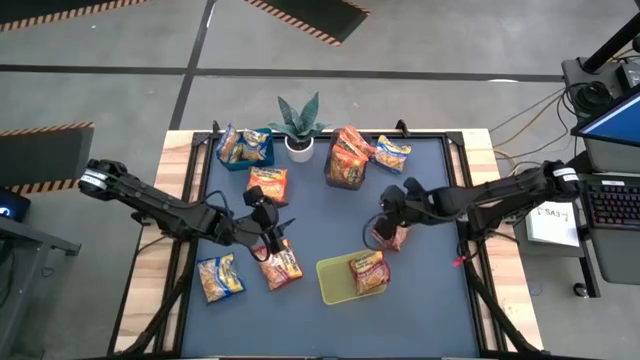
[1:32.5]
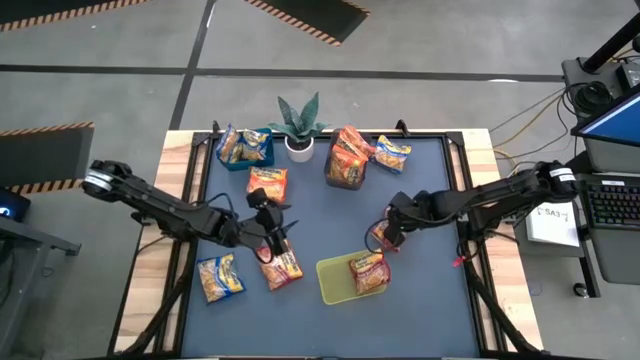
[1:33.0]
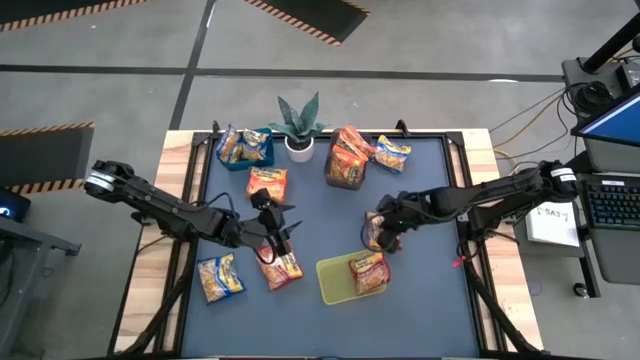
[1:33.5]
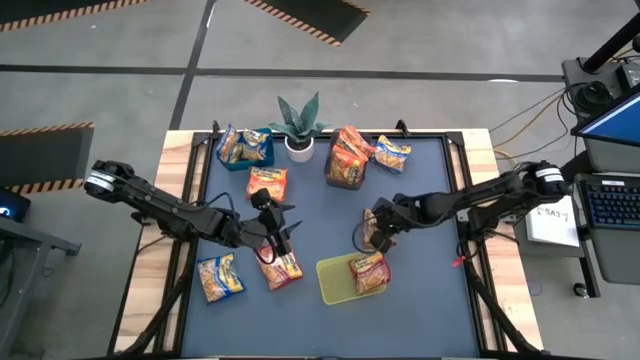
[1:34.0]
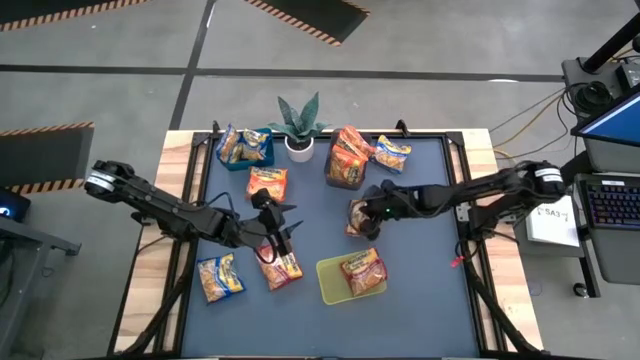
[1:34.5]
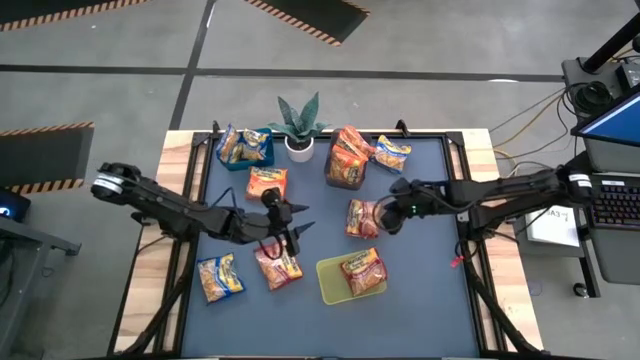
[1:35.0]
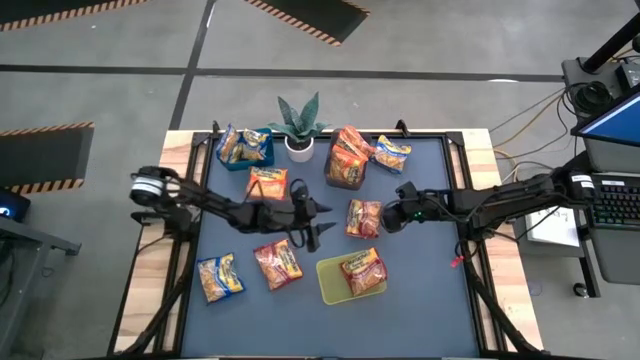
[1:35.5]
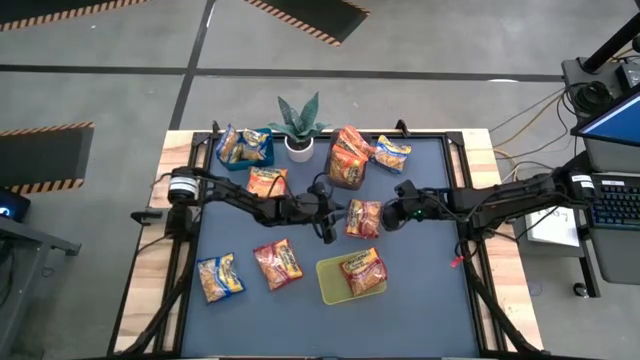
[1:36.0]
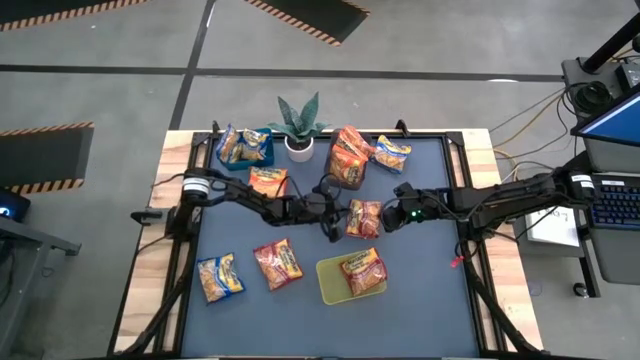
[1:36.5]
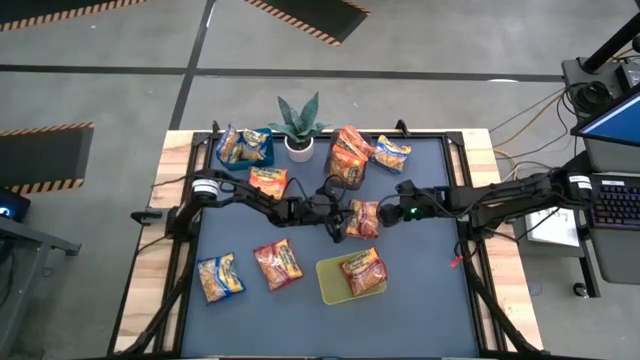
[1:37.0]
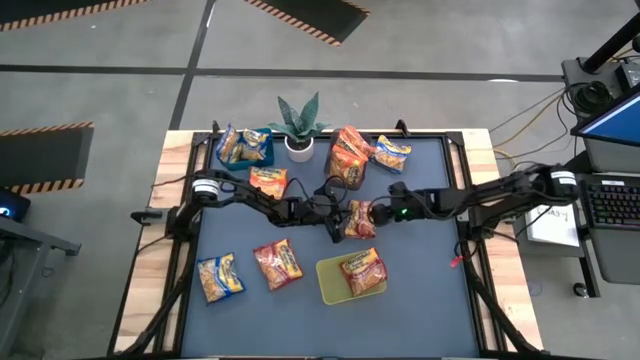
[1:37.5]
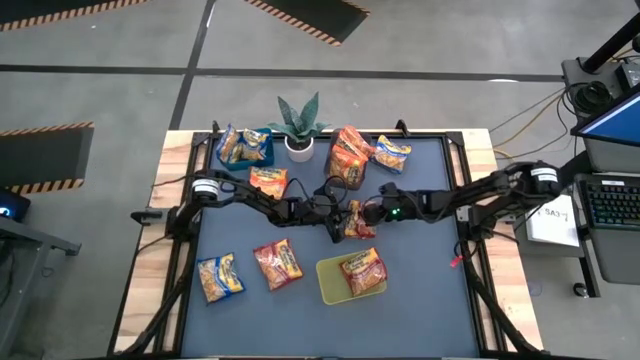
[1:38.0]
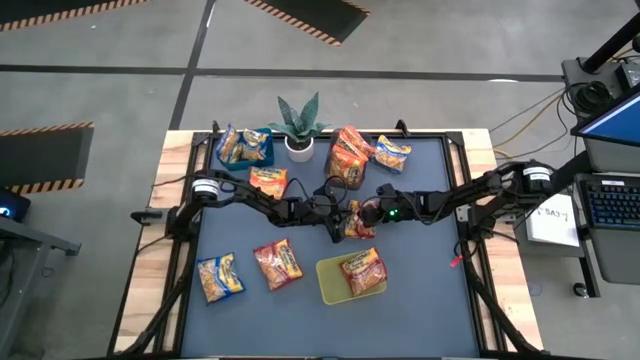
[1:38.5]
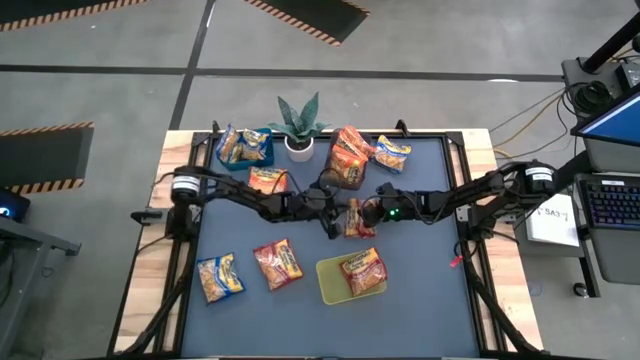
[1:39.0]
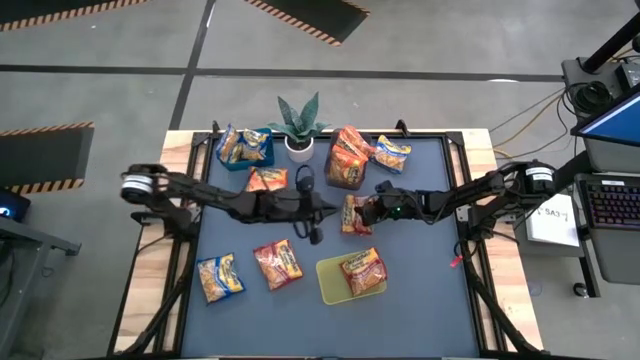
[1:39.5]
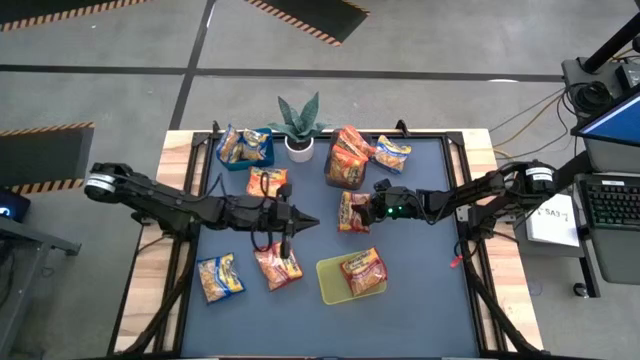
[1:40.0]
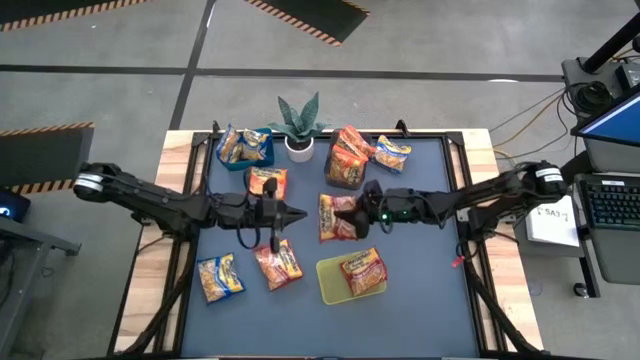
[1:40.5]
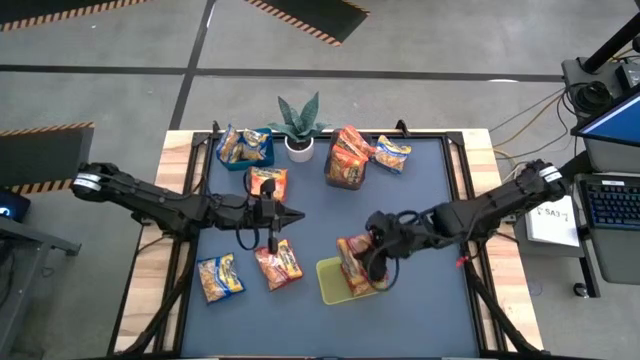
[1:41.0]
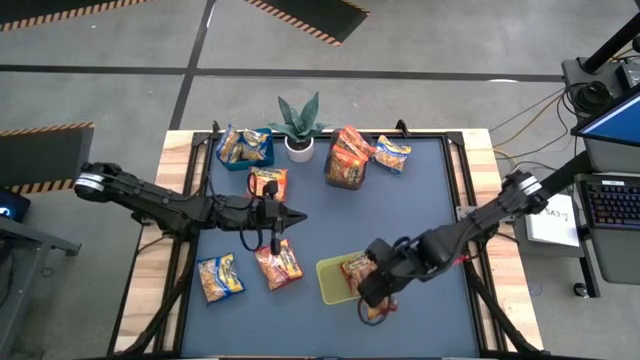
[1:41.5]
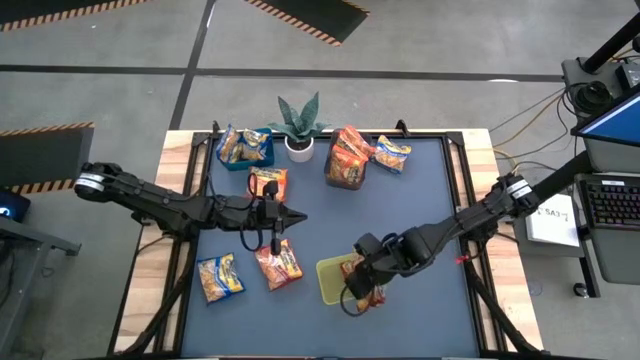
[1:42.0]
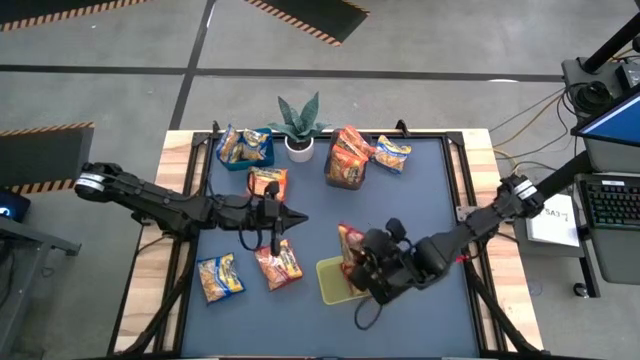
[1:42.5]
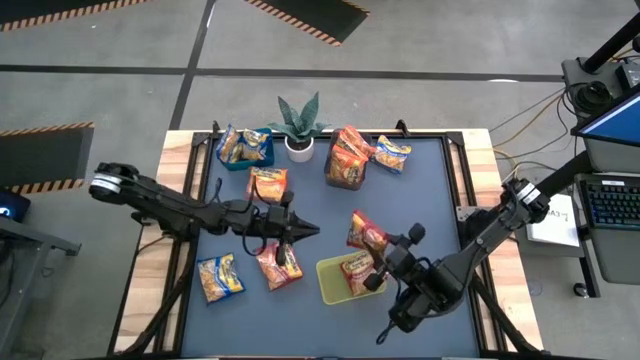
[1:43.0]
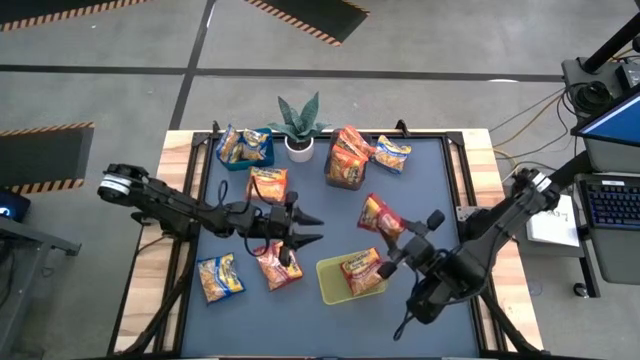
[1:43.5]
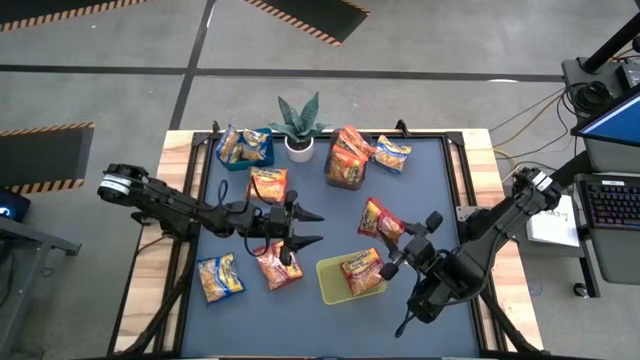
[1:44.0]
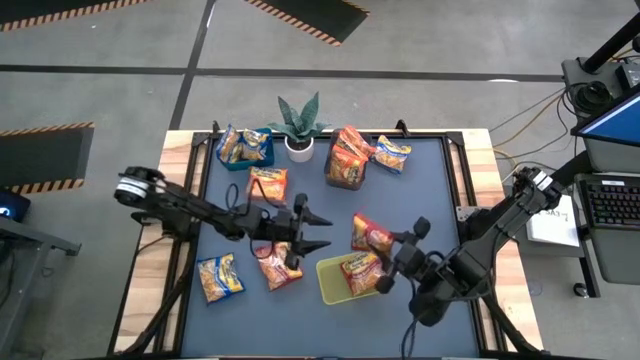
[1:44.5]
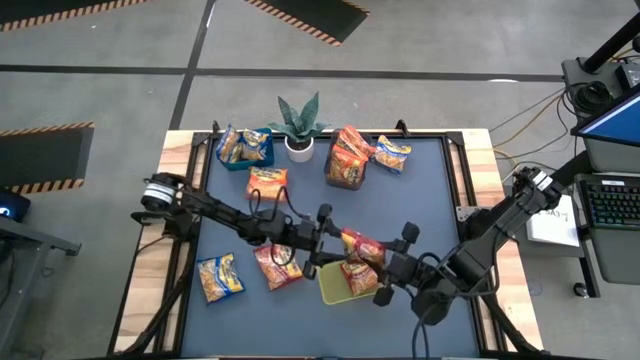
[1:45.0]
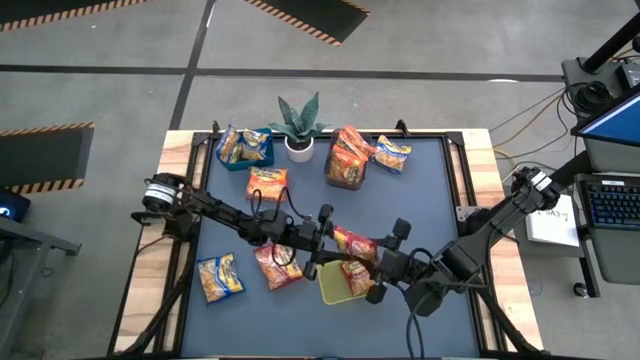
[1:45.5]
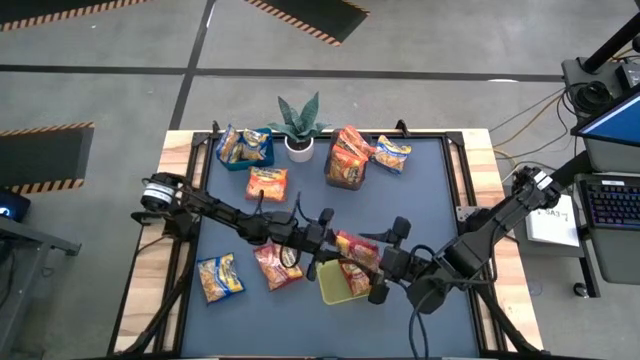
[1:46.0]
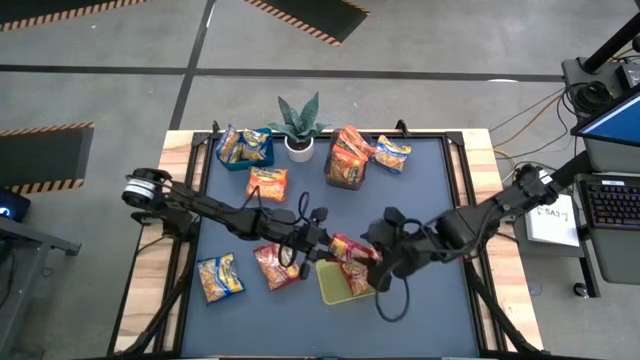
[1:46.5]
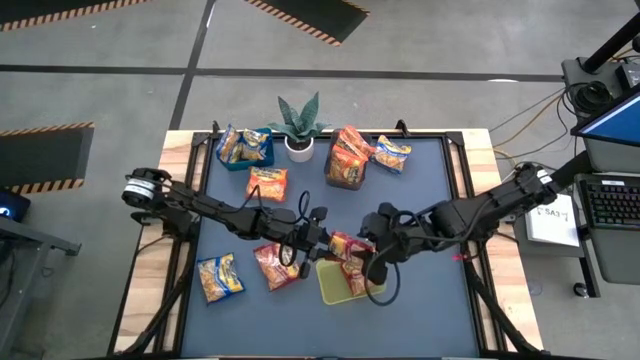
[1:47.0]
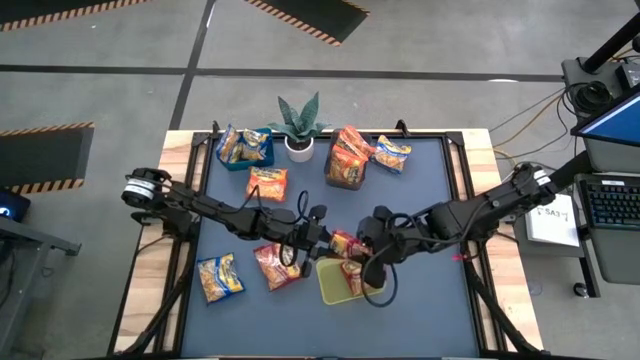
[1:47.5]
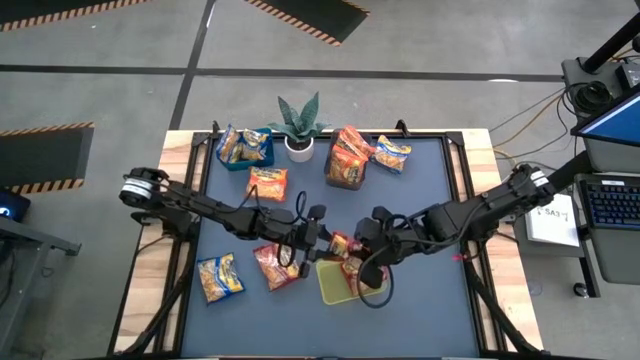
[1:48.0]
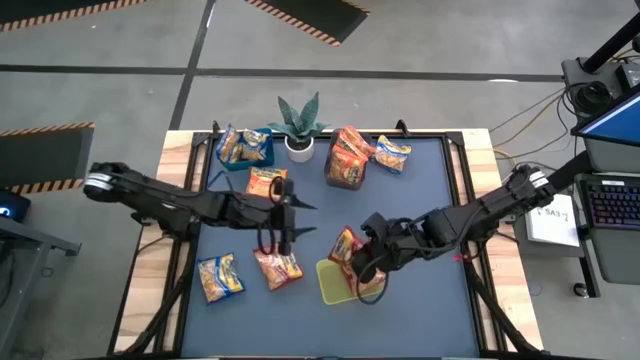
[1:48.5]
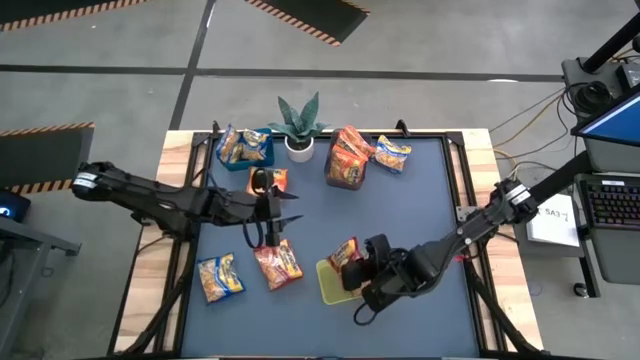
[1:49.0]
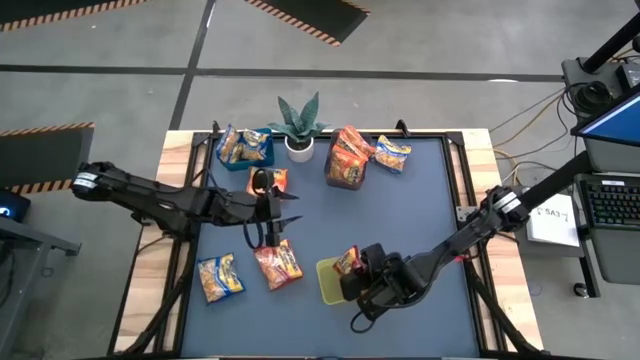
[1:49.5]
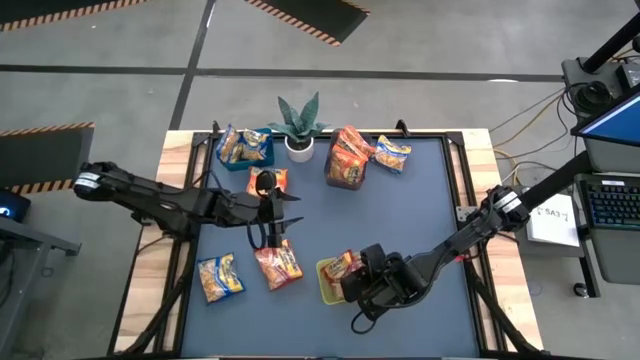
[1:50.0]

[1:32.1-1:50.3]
Task: Sort Maruchan noodles
Put the red bag into the yellow bin

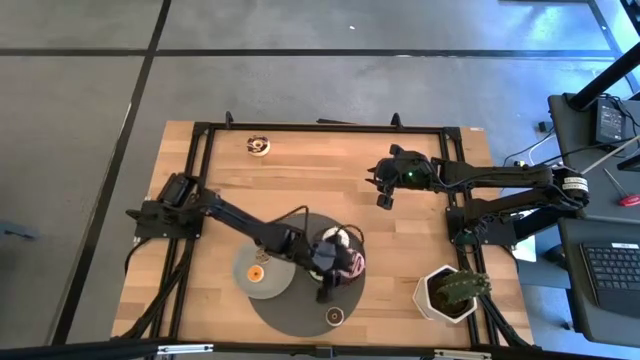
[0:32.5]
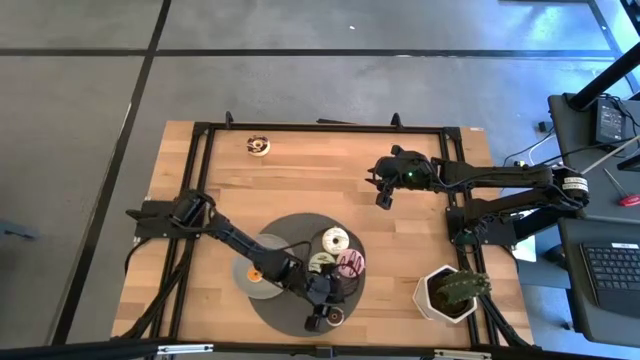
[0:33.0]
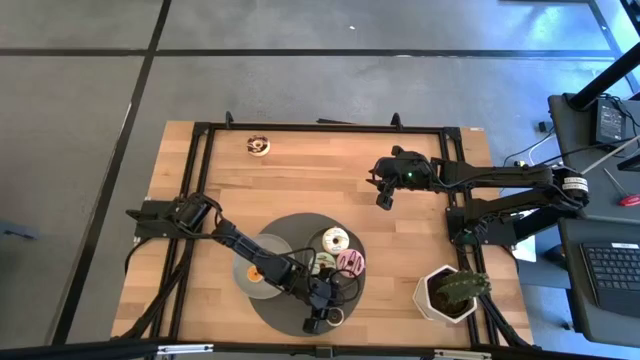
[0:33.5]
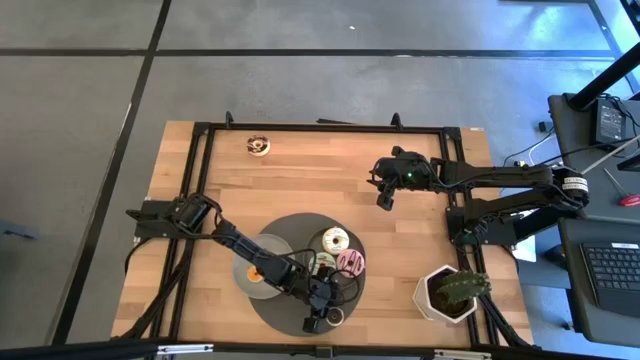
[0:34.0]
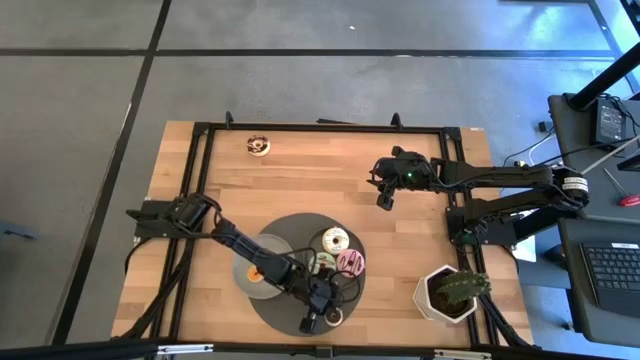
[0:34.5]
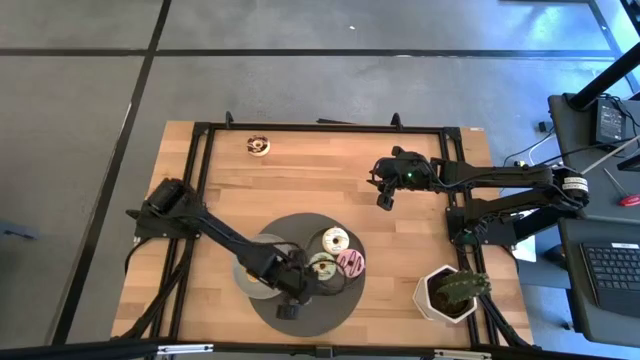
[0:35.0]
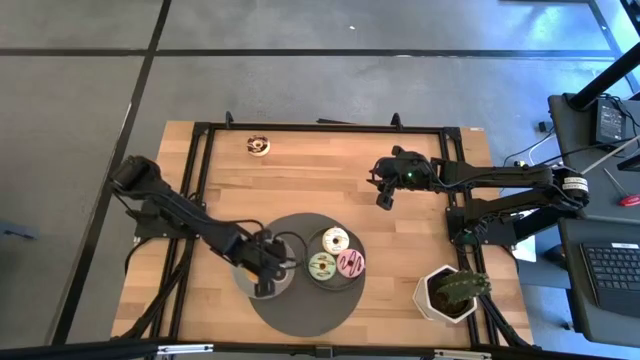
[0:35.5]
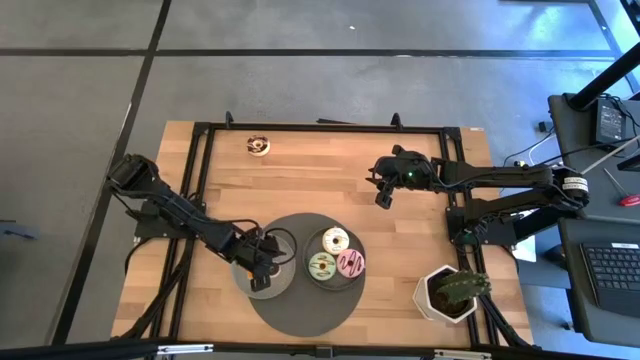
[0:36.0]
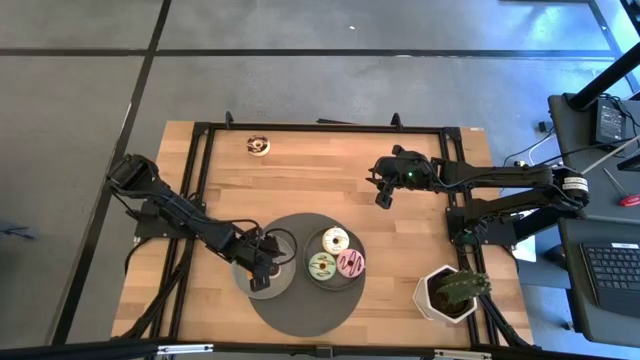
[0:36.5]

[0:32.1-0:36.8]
Task: Pick & Place donuts
Put the small black donut on the gray plate
